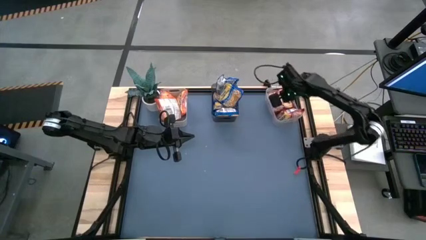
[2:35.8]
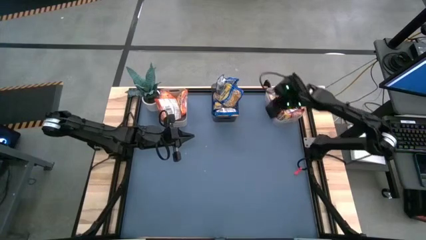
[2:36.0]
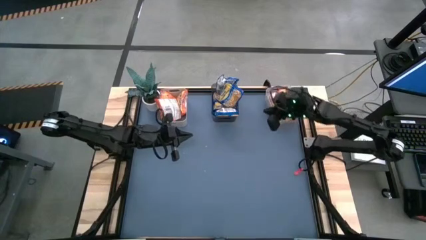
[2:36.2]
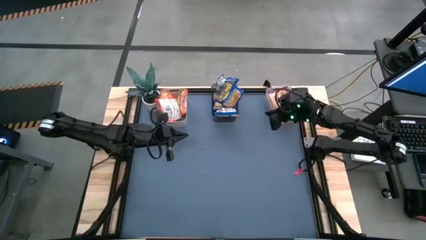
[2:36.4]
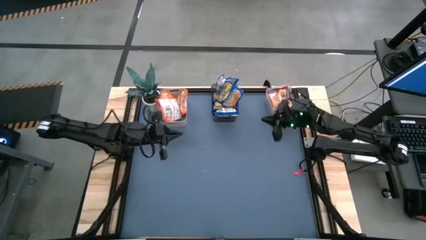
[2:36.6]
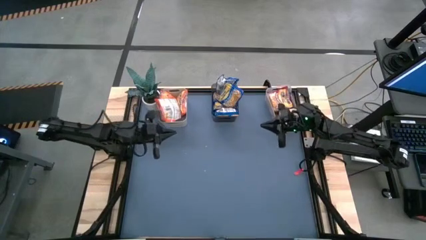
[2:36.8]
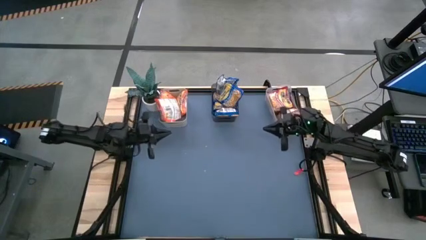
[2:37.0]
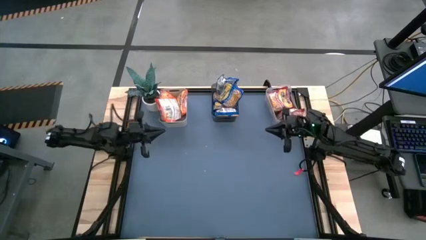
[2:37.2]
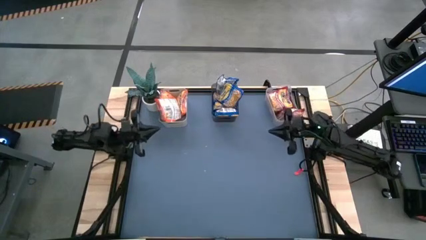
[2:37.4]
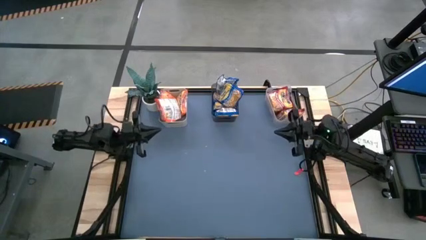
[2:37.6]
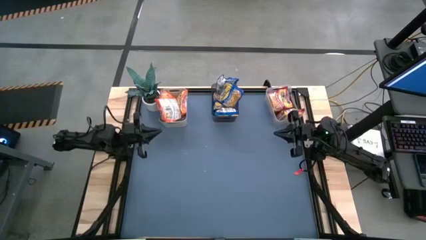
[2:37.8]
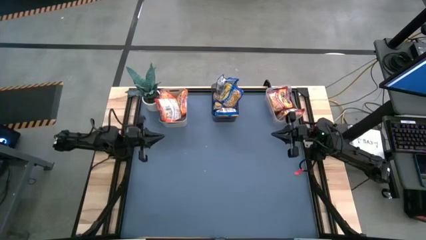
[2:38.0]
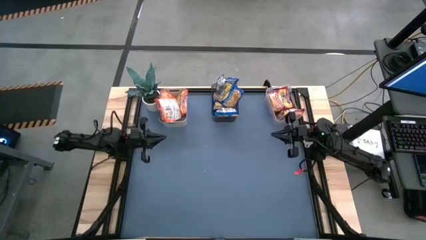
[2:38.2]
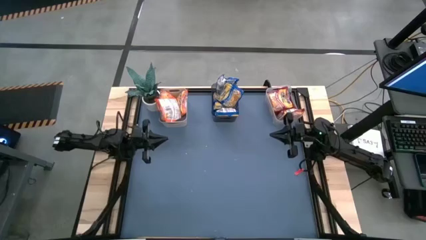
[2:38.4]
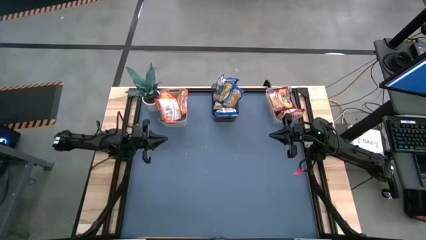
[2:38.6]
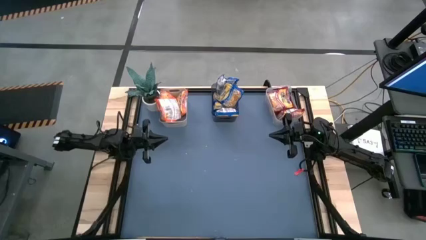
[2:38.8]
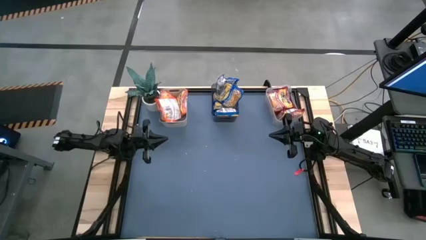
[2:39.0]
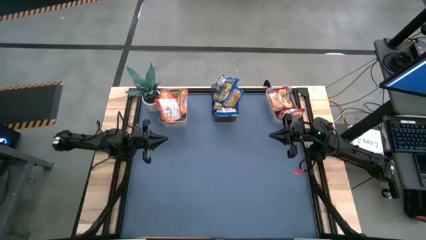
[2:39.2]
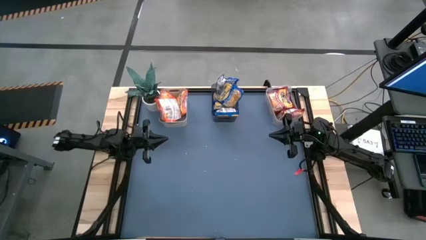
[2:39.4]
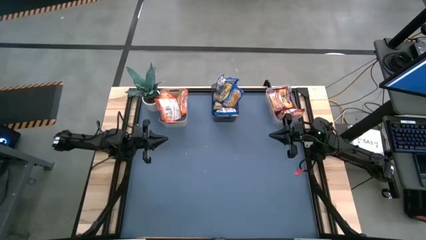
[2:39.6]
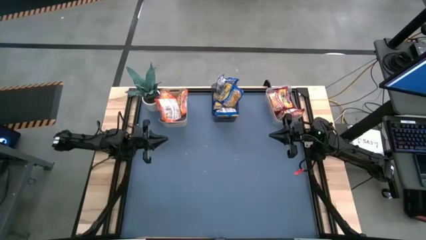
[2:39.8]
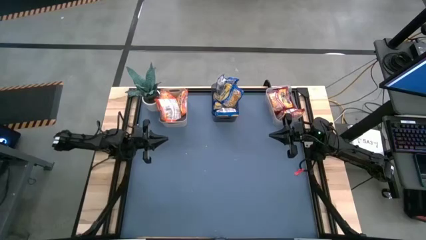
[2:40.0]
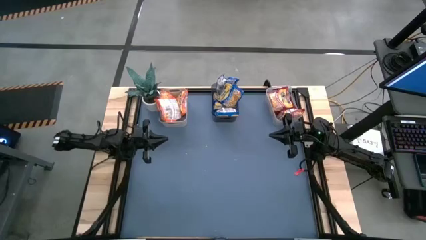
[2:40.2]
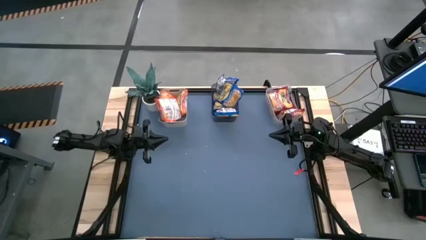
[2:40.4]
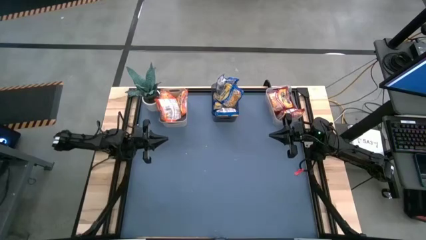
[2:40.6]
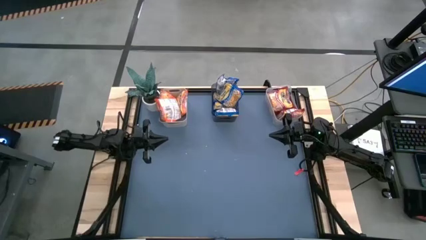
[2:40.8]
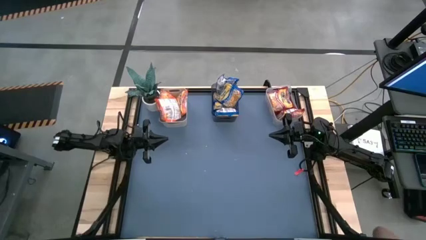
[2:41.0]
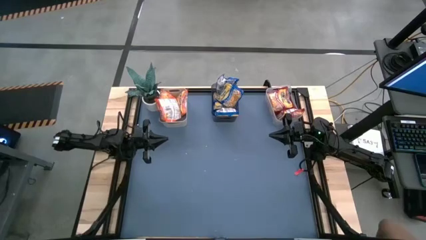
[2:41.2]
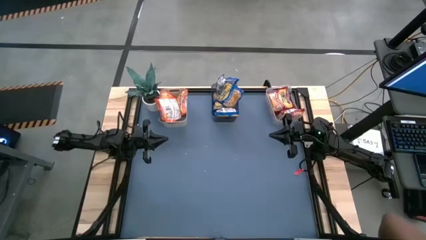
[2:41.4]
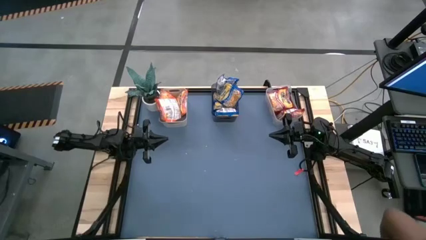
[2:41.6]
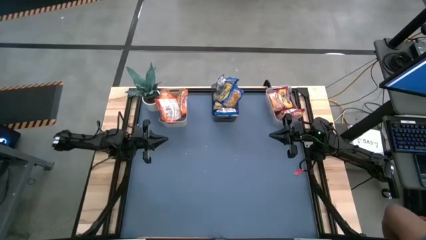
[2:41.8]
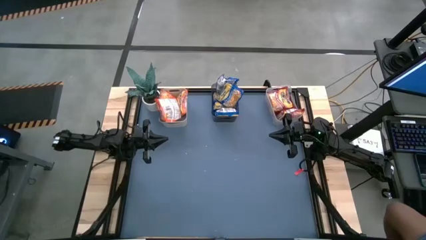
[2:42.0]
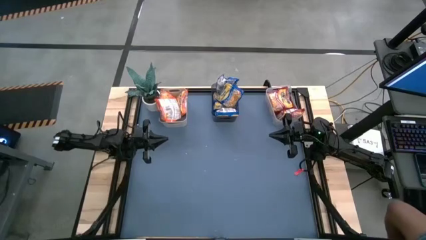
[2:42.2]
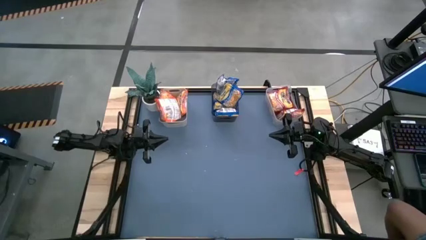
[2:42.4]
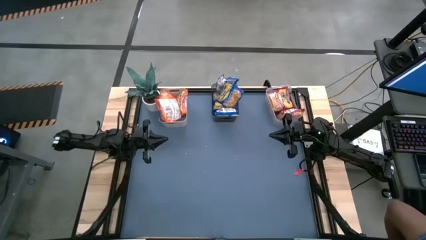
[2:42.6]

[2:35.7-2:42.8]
Task: Sort Maruchan noodles
Return to Home Position

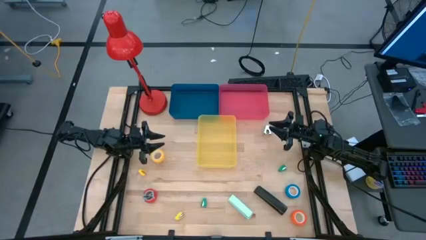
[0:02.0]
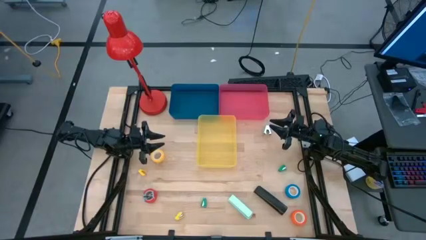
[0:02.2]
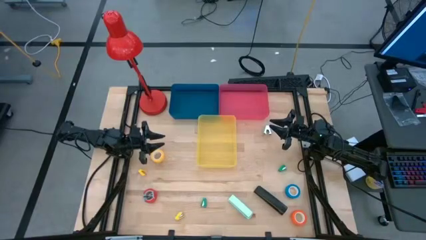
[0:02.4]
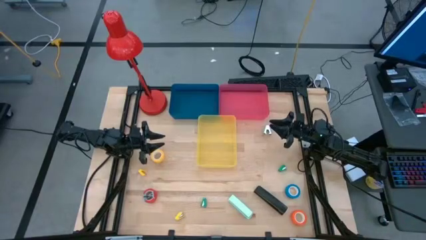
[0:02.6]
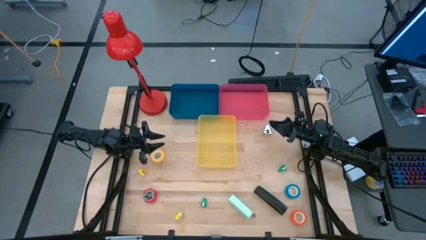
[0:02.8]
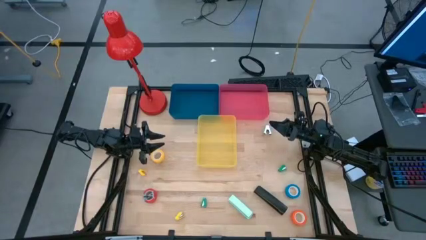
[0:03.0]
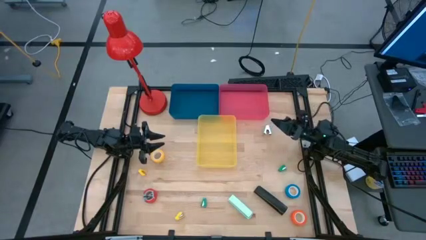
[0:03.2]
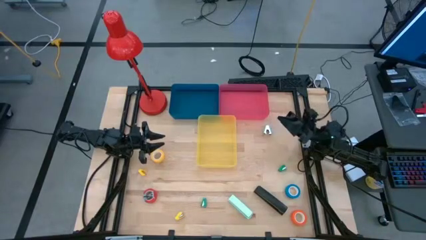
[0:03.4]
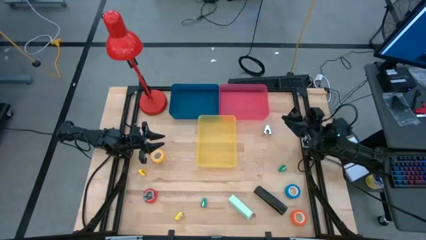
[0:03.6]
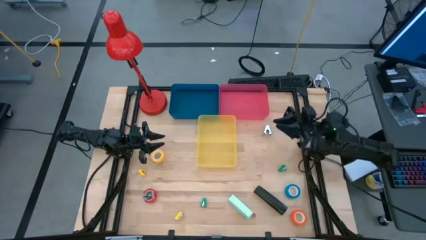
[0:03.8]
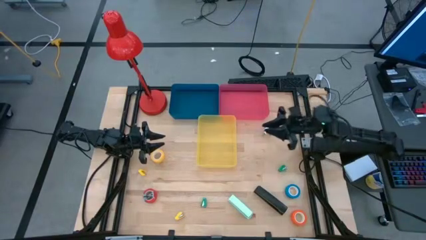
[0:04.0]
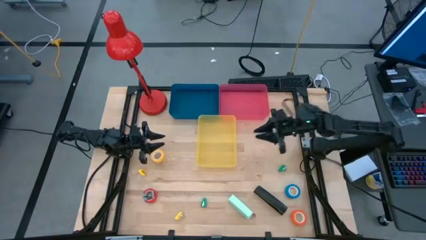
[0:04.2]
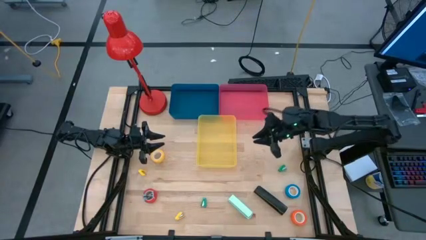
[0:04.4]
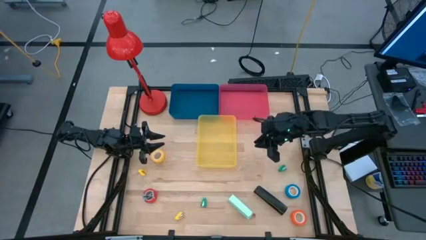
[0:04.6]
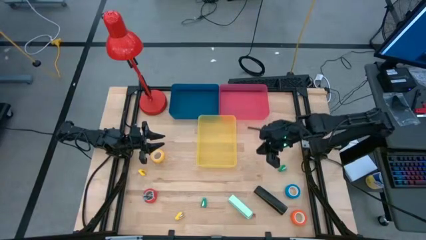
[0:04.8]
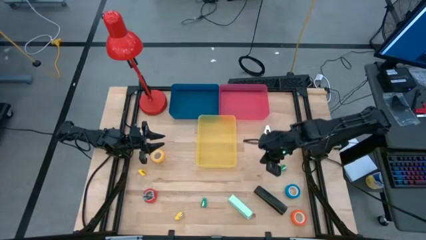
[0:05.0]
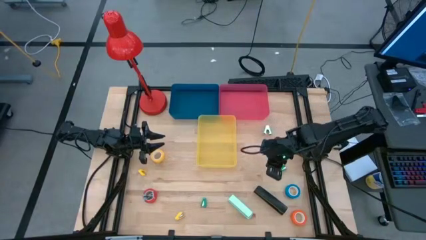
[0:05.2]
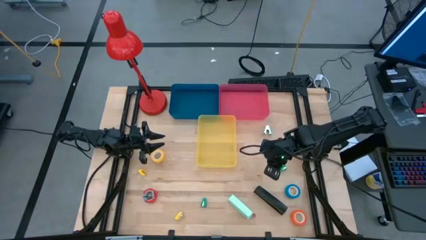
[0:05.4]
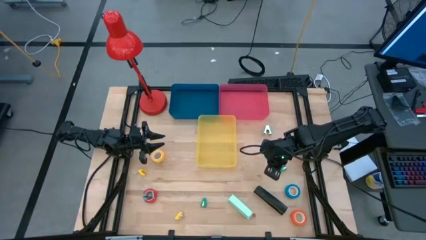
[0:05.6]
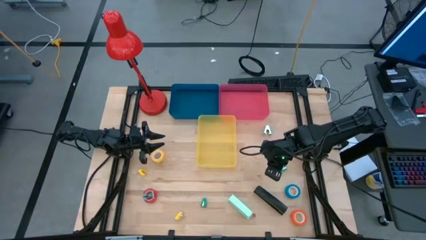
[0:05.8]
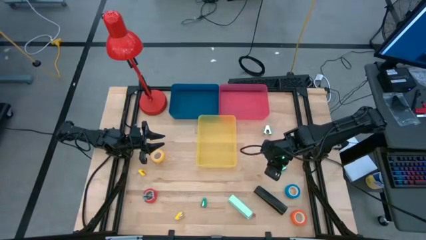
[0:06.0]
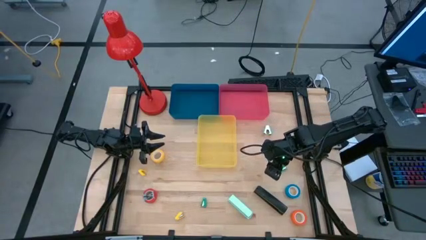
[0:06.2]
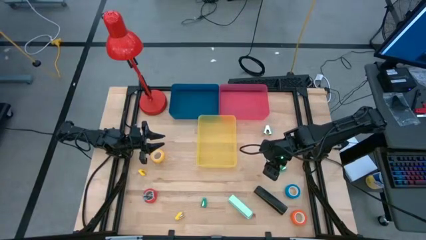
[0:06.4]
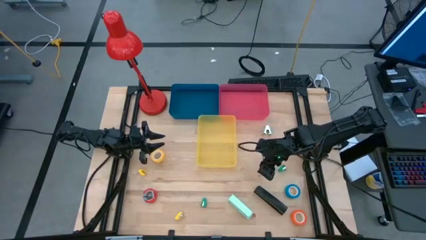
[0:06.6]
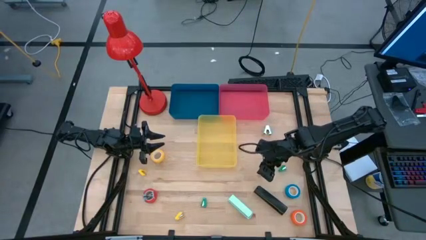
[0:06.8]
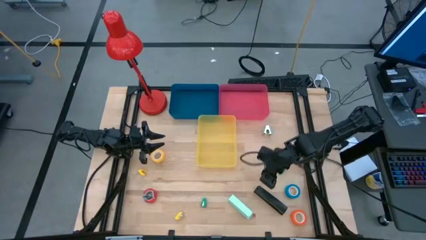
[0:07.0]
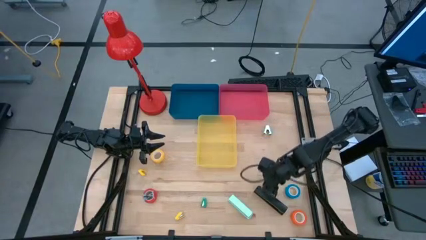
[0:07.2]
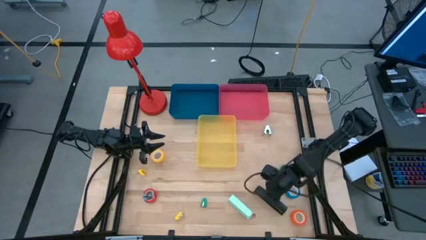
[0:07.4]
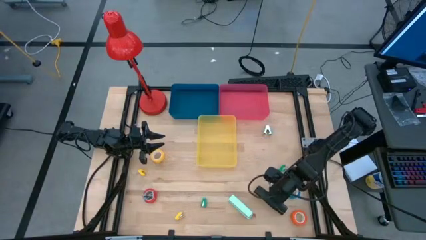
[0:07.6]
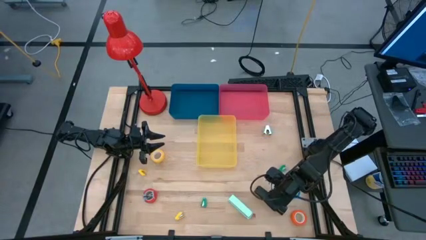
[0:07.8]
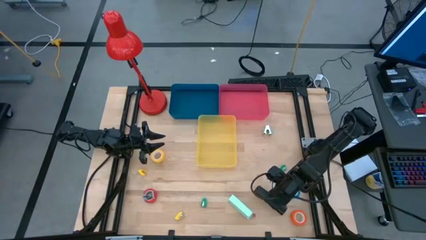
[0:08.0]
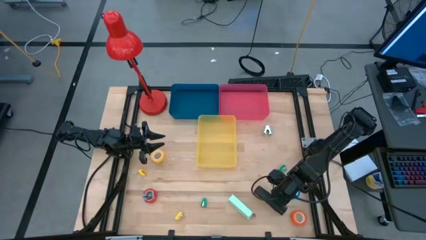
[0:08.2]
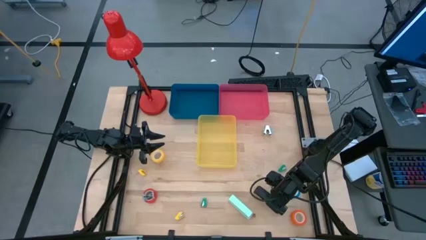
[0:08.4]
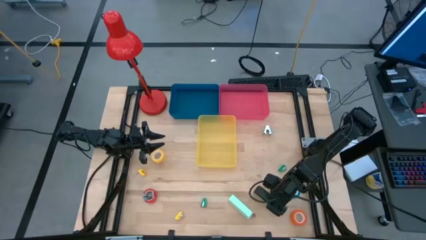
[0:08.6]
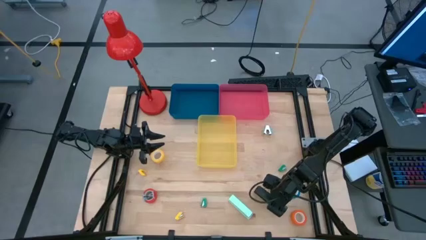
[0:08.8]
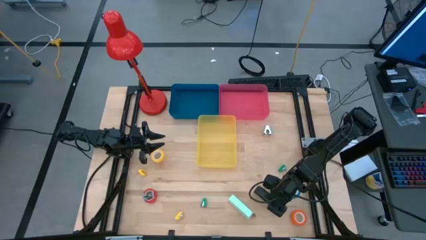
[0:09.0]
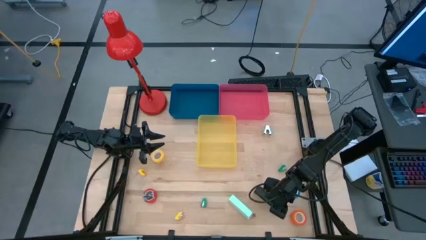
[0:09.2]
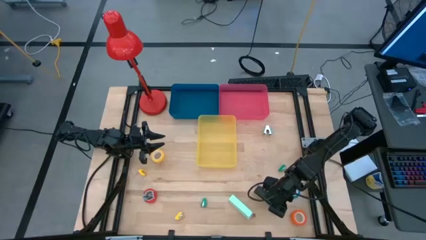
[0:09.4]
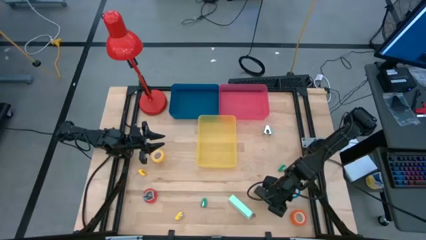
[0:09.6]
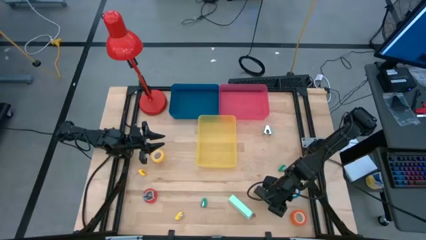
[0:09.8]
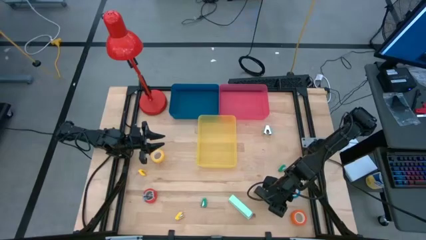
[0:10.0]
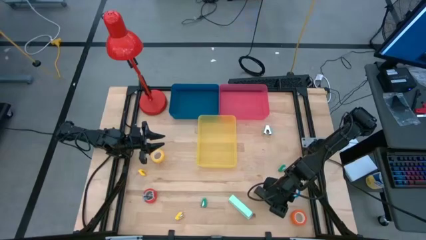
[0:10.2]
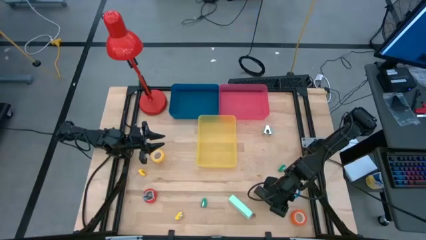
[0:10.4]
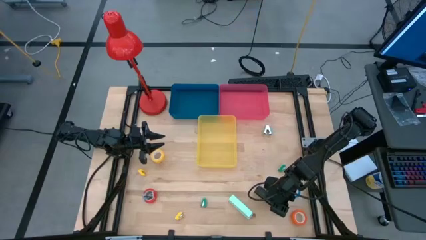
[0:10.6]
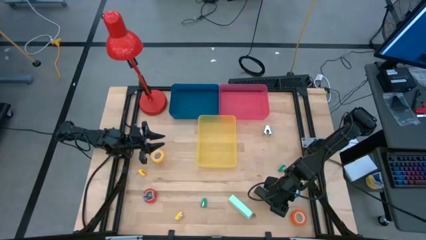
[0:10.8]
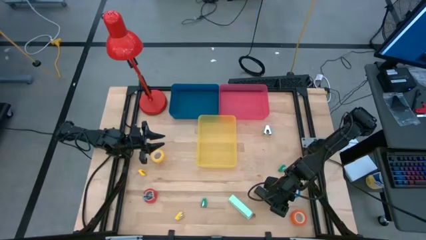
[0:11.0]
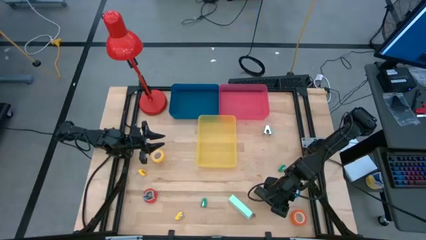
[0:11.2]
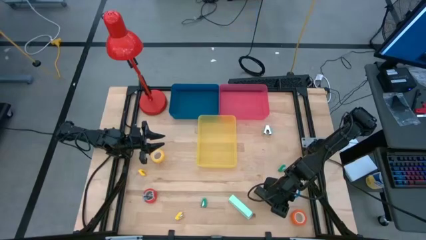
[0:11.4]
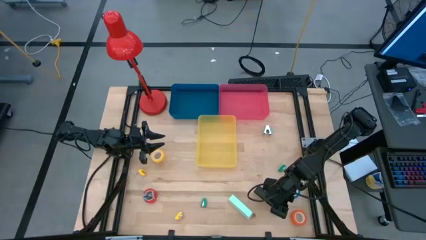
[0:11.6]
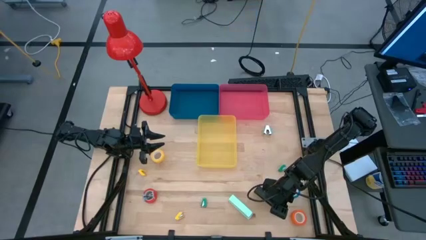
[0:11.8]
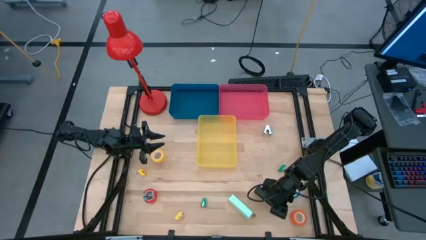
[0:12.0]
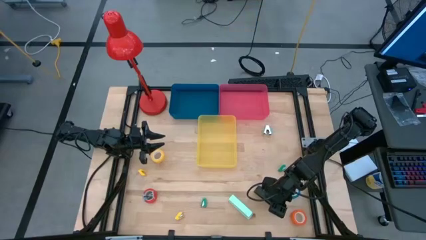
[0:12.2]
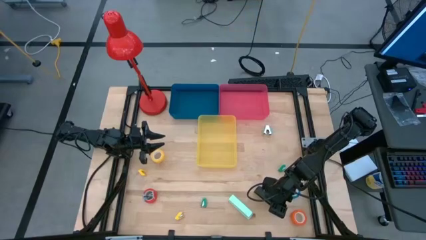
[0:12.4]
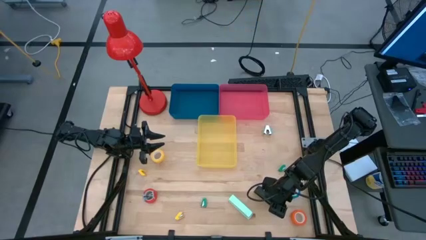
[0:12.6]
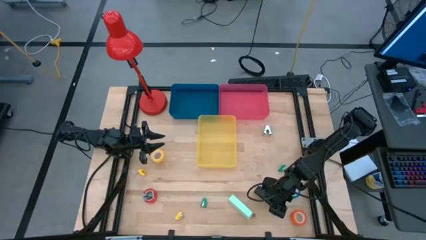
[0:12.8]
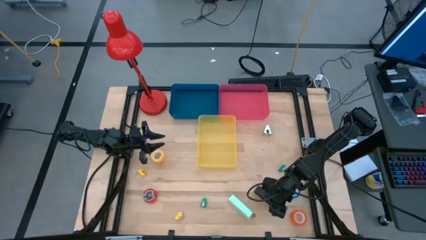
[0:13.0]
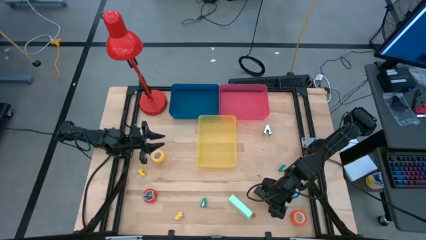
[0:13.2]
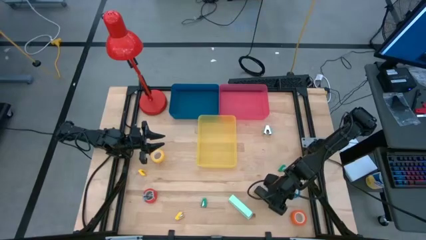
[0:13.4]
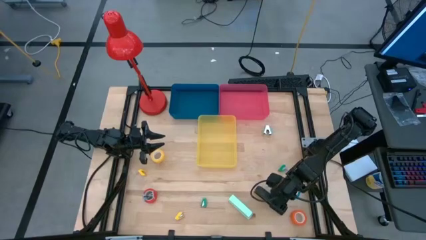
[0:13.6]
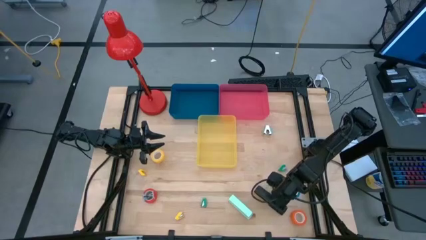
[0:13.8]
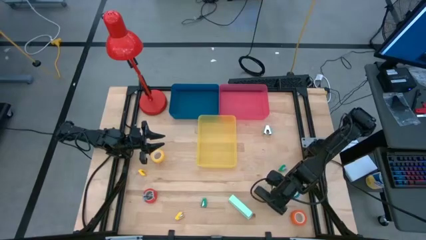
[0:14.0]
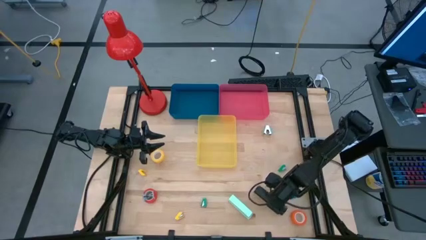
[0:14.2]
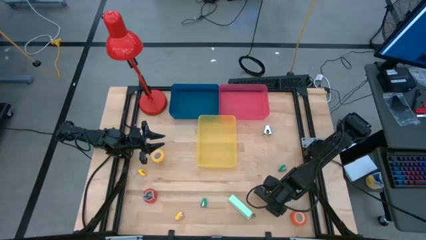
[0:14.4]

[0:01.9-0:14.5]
Task: Pick and place Stapler, Stapler remover, tape
Put the black stapler into the blue bin
